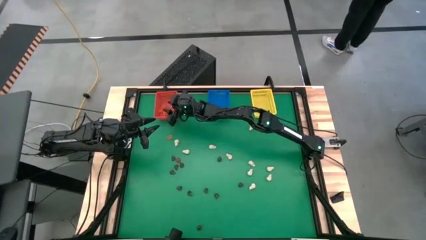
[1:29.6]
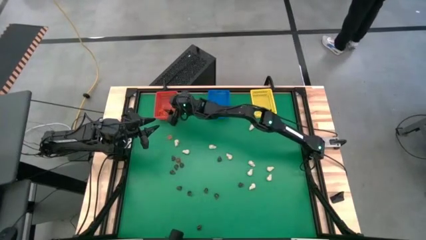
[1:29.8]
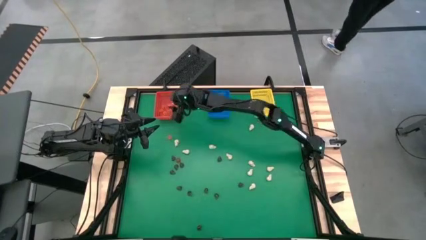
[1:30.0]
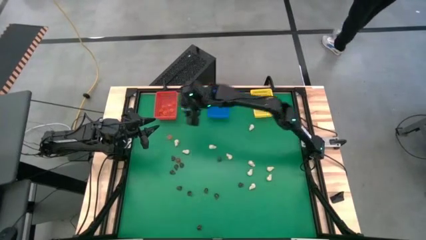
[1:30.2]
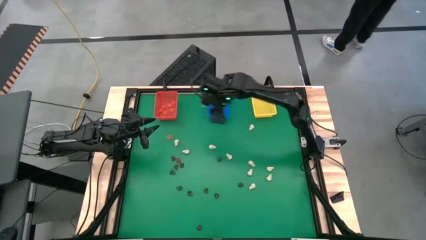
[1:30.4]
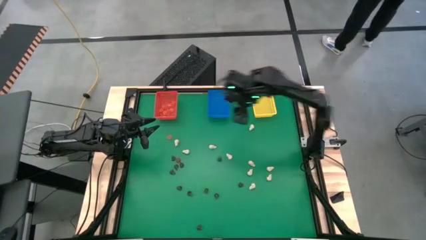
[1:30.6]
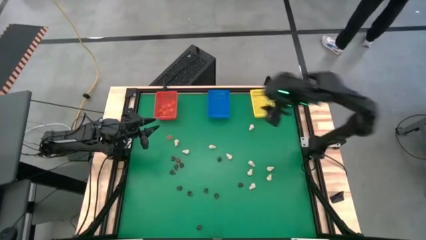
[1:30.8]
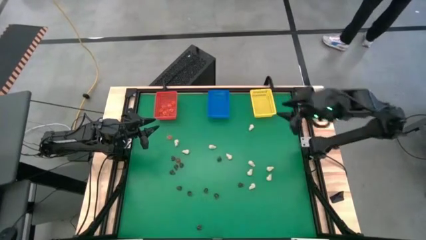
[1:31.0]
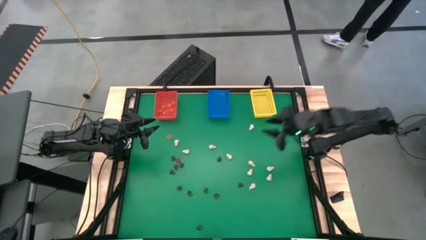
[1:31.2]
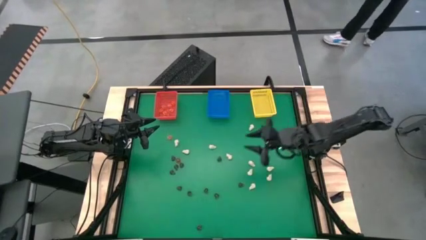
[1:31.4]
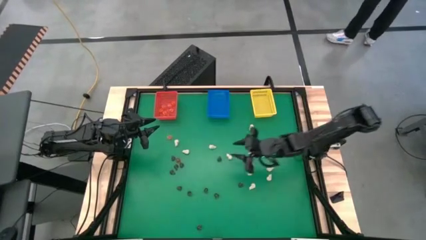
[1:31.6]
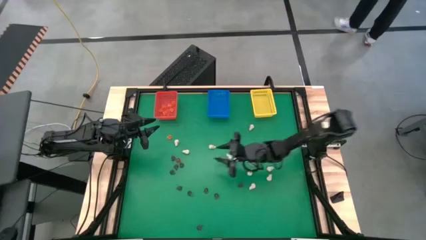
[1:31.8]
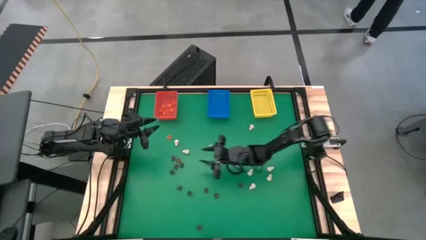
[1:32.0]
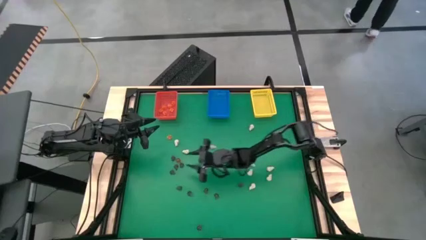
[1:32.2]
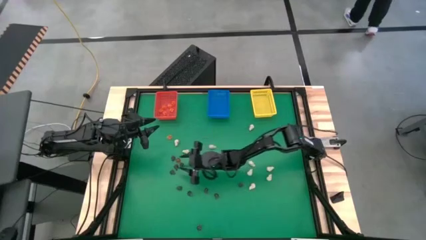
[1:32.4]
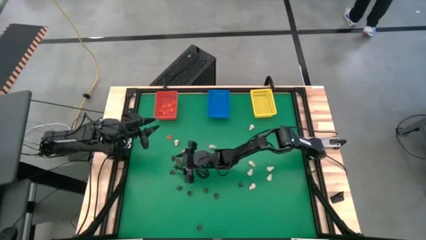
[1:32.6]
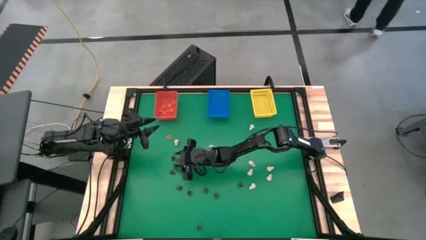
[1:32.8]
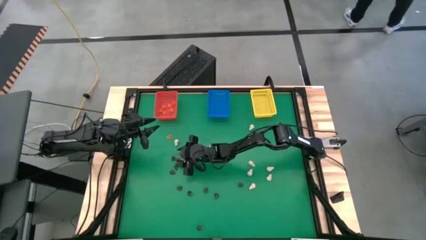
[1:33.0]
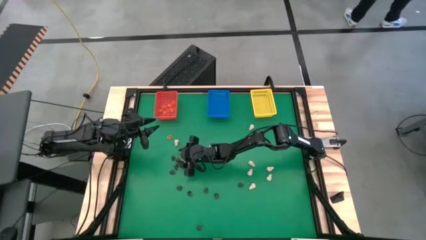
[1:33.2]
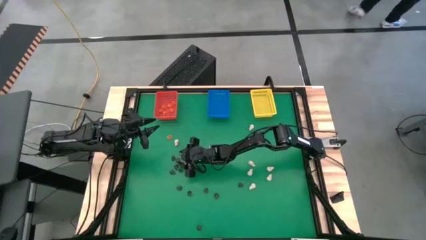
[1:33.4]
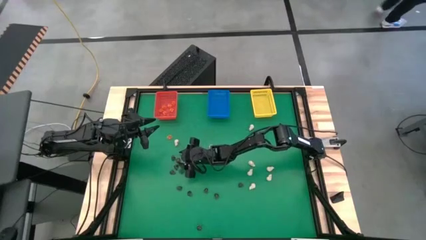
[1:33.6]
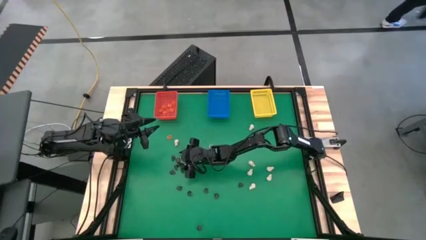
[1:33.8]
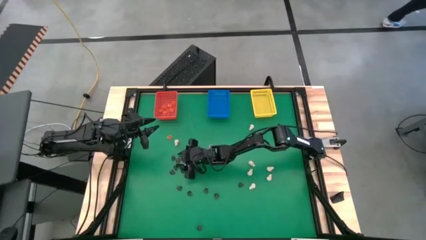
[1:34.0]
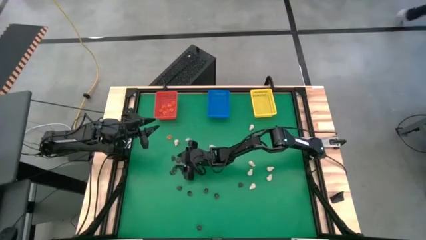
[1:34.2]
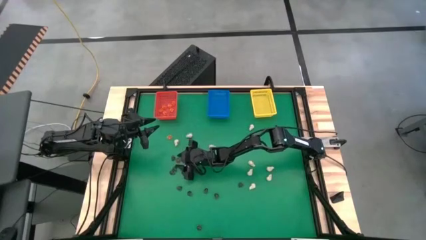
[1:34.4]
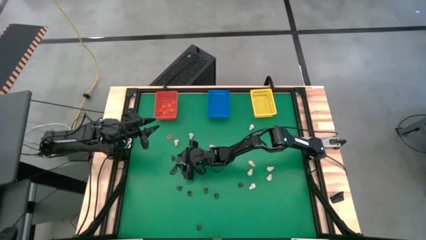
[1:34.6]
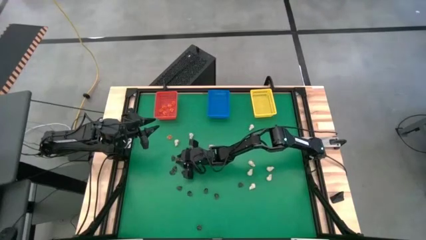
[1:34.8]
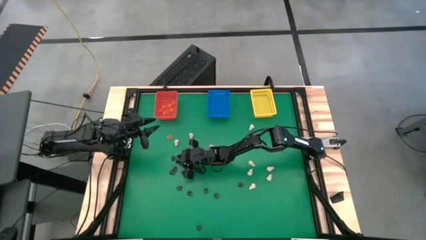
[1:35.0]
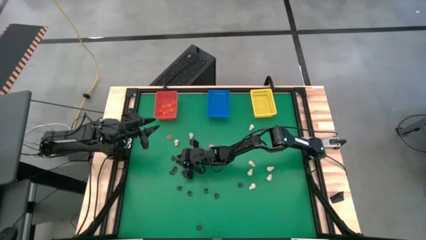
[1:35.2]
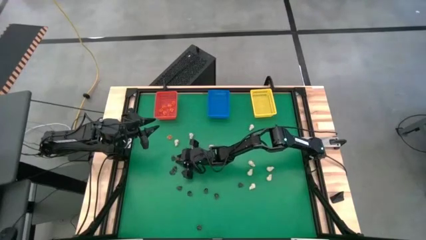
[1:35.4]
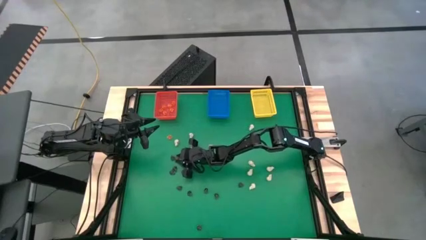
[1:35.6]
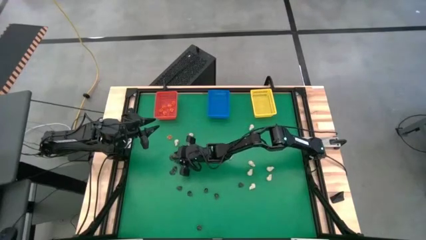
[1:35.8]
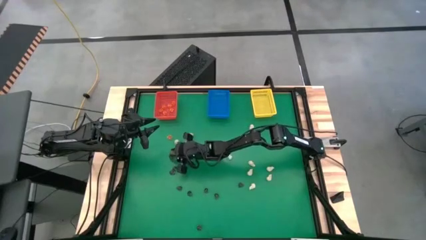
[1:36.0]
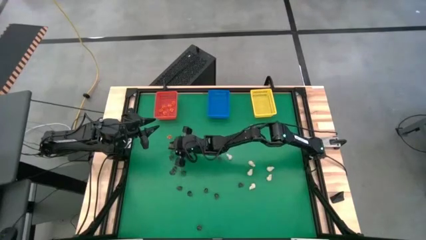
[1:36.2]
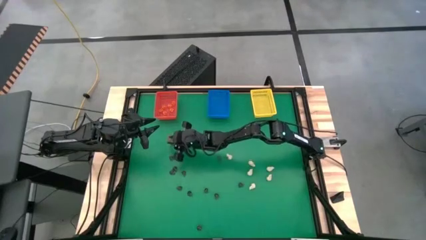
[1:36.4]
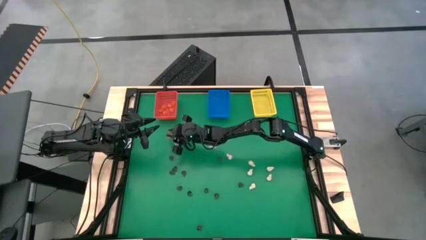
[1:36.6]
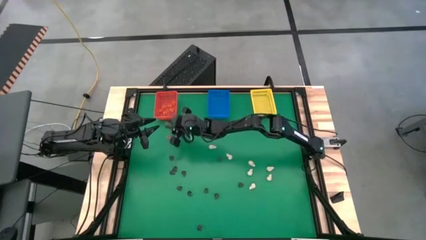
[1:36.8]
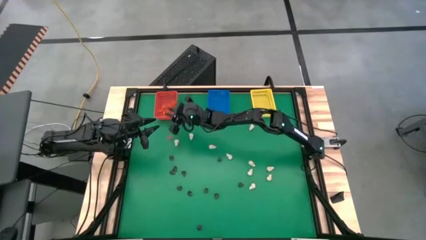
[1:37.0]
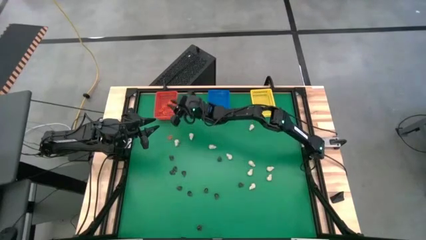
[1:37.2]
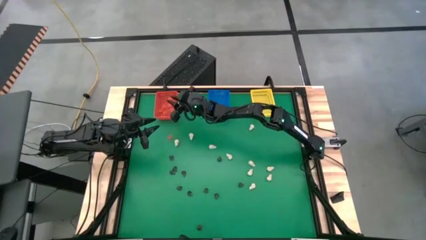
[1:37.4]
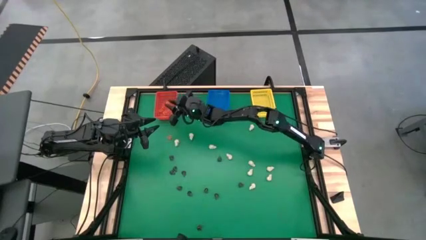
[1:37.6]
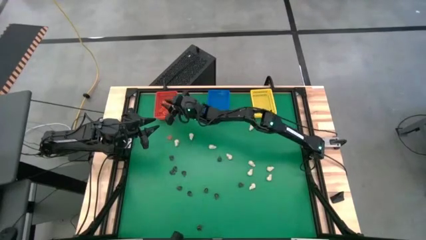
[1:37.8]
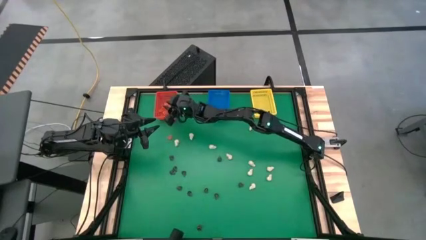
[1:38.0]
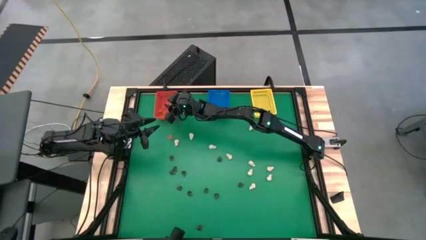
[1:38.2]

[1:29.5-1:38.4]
Task: Sort Halloween decoration
Put the orange pumpkin toy into the red bin

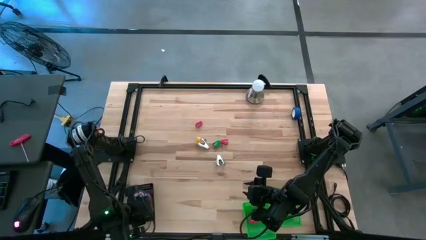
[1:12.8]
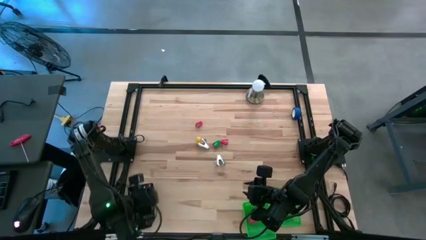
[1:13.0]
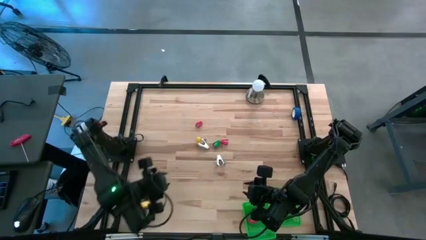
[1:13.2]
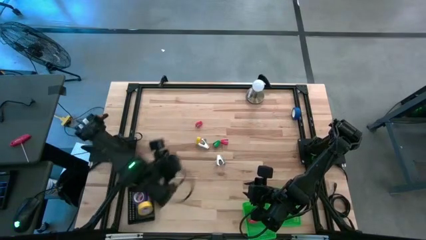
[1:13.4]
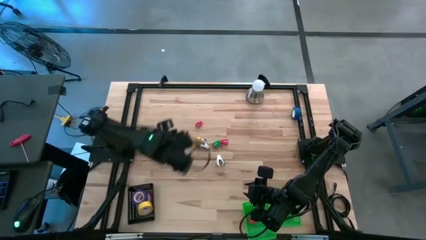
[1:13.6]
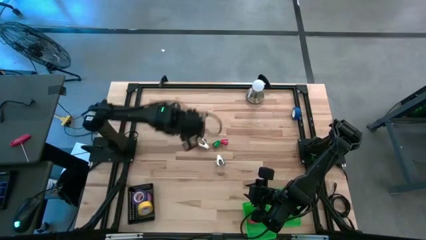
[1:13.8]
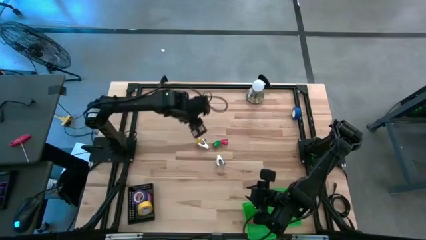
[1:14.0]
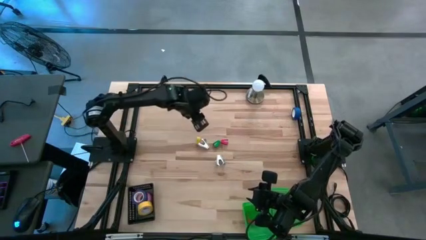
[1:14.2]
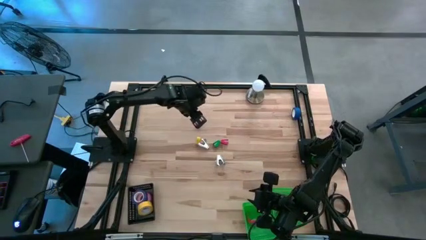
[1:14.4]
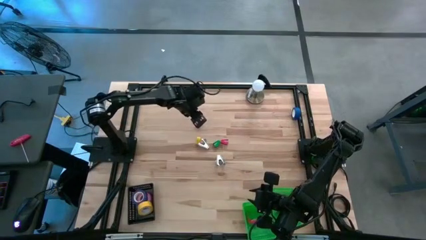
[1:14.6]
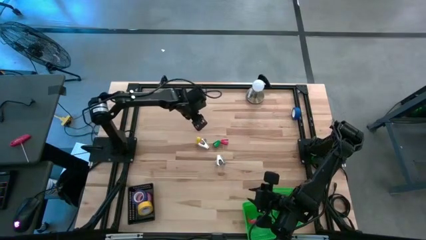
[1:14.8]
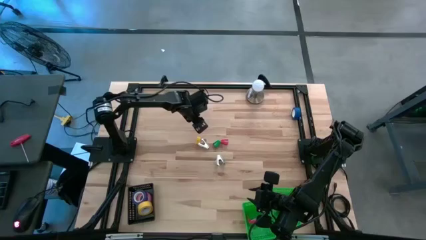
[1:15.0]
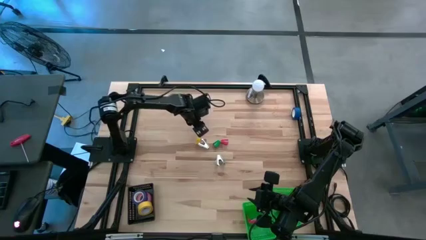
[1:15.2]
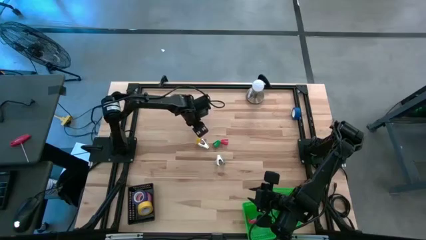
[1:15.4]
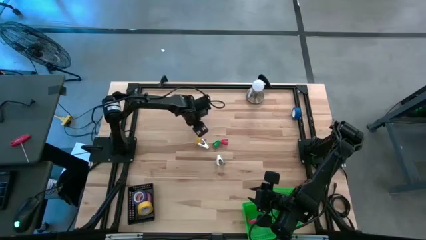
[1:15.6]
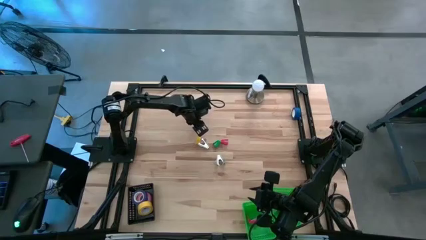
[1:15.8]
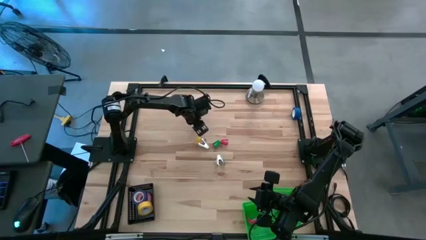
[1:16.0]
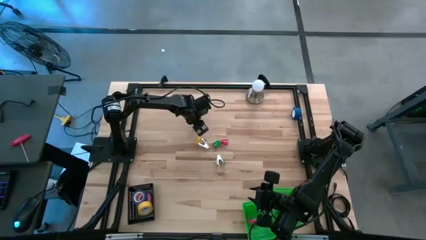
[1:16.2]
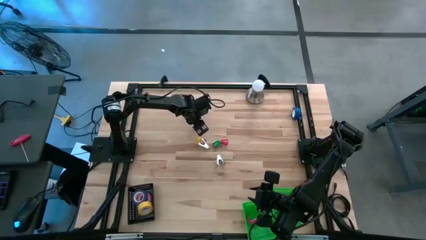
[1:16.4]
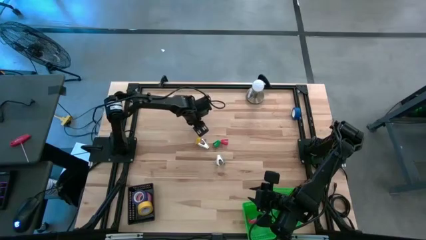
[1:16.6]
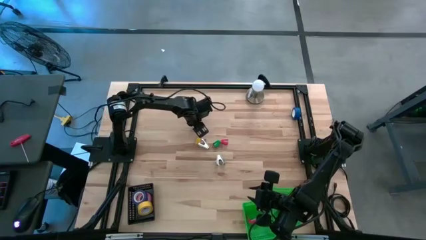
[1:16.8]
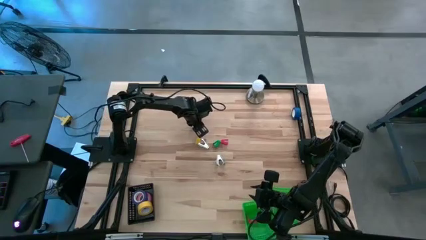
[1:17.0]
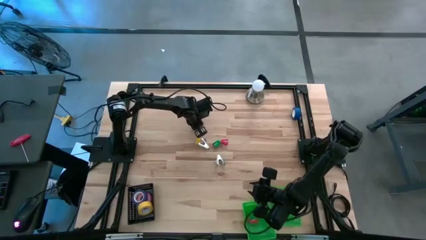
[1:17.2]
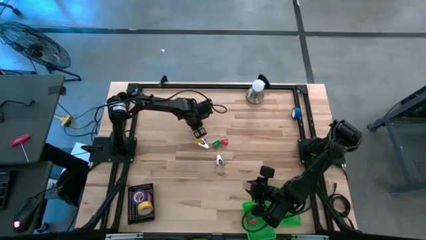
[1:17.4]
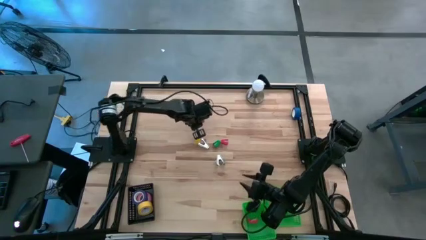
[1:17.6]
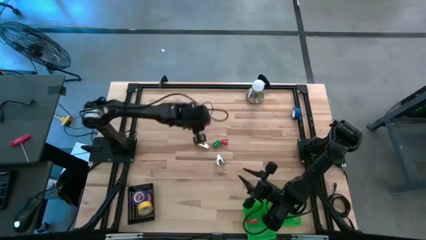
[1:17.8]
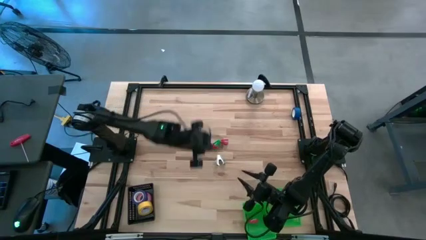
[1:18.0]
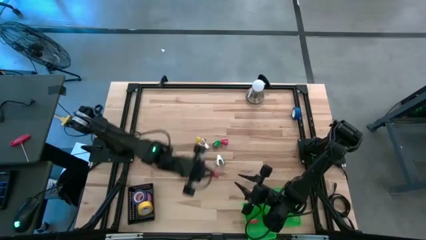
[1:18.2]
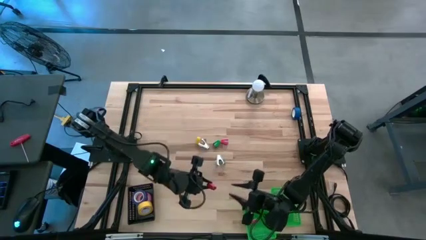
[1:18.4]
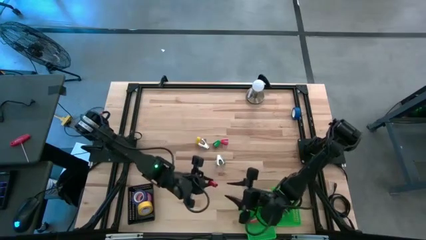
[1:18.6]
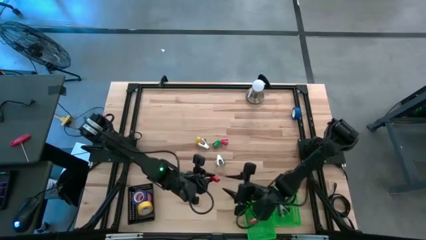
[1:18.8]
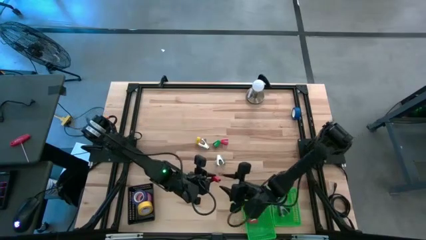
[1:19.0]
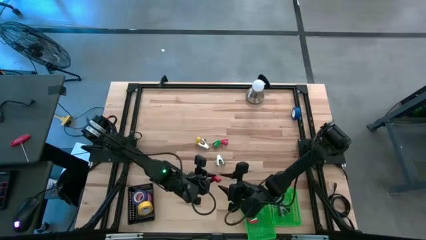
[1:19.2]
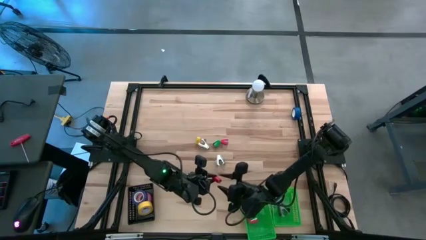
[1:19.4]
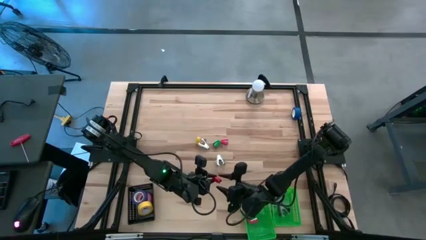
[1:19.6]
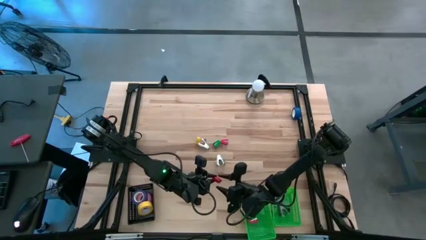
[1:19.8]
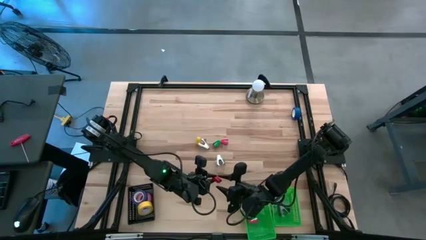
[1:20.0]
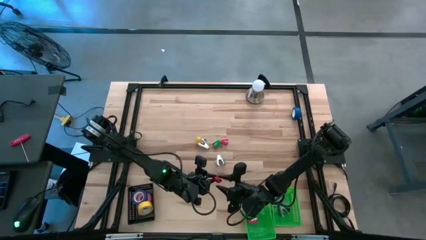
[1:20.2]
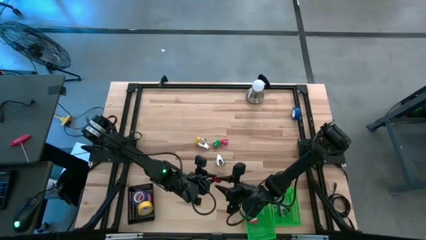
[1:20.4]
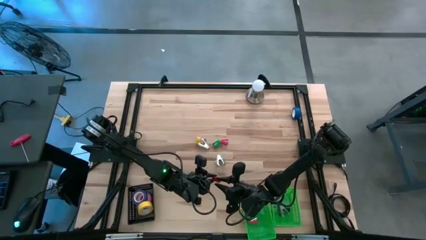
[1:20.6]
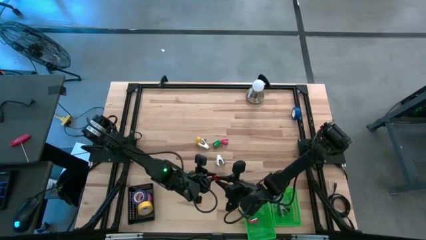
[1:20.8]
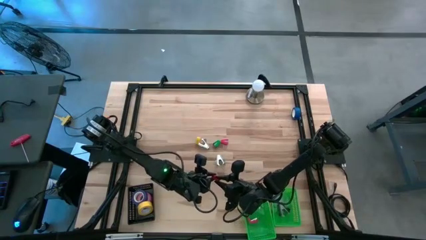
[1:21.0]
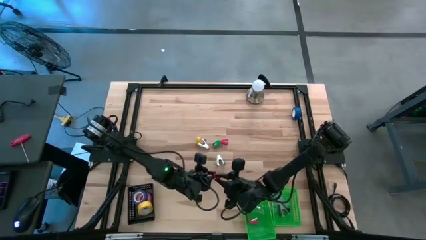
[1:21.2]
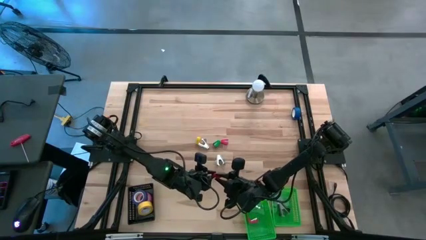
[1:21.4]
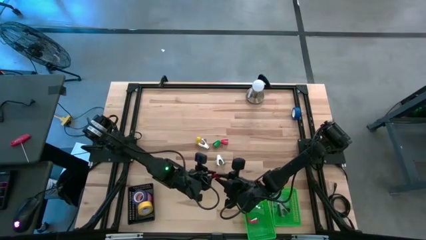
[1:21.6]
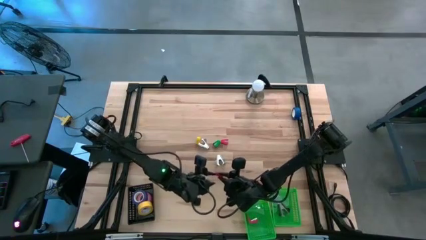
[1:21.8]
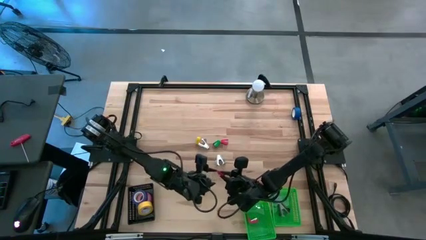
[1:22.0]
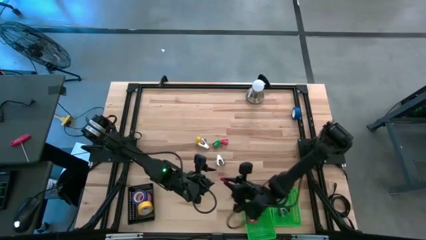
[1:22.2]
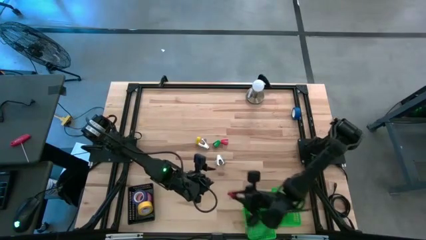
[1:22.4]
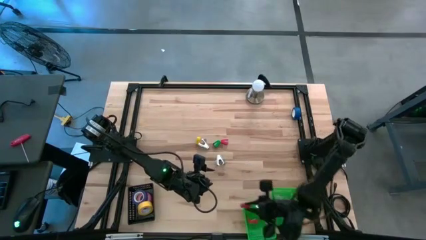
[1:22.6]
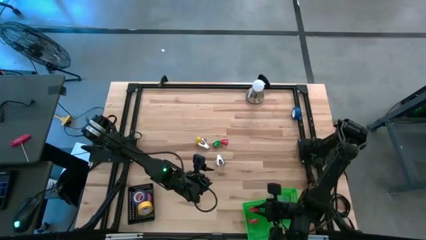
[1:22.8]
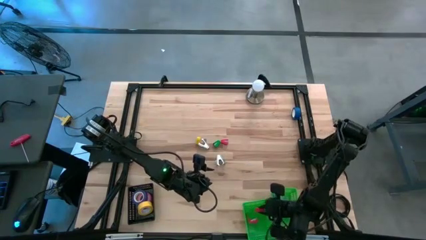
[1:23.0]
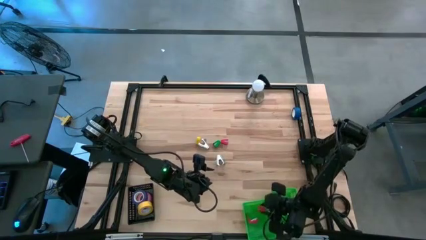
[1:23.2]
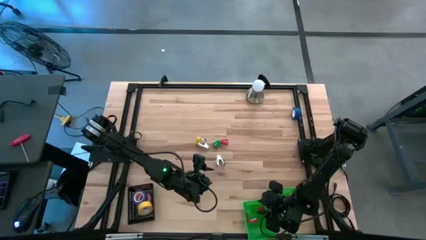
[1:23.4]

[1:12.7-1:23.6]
Task: Pick and place Stapler, Stapler remover, tape
Put the red stapler into the left green bin
